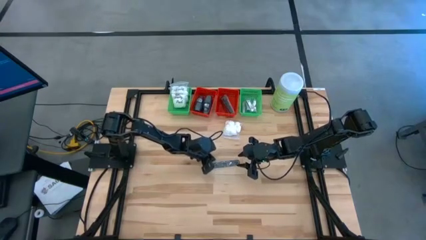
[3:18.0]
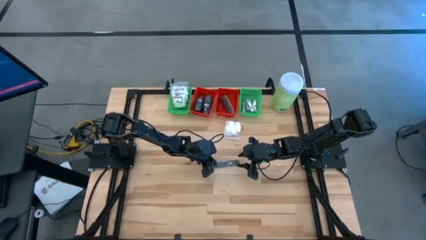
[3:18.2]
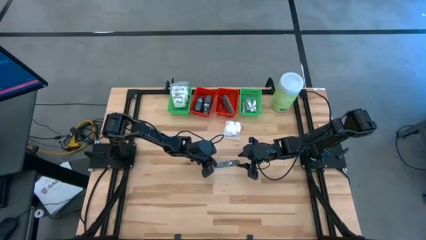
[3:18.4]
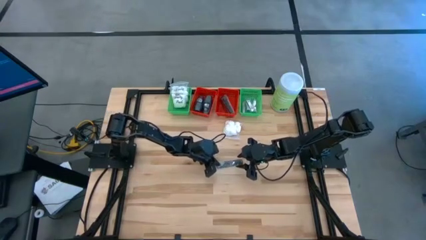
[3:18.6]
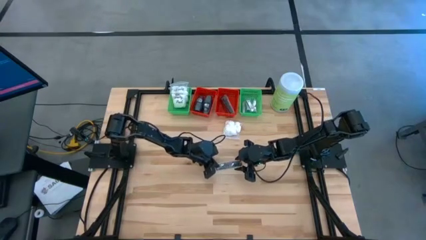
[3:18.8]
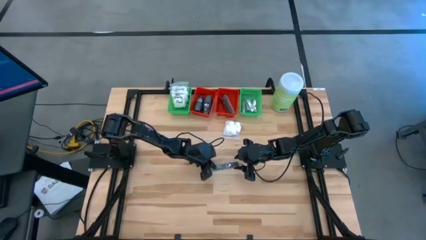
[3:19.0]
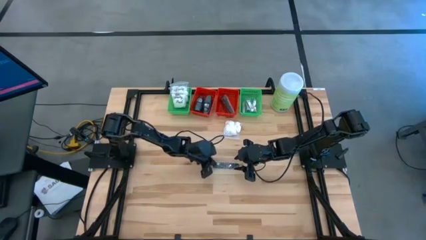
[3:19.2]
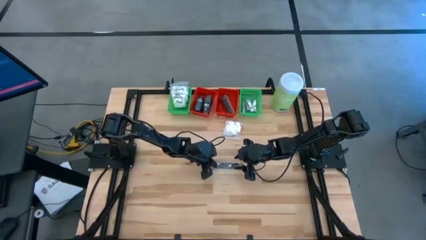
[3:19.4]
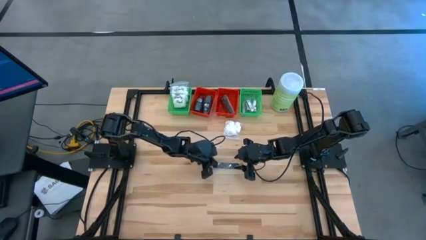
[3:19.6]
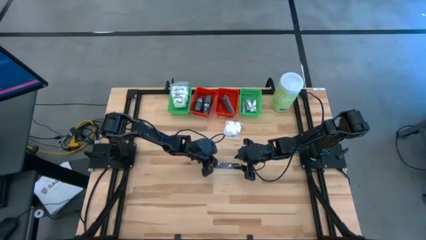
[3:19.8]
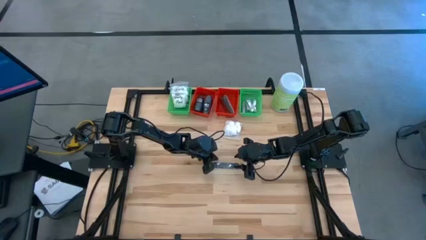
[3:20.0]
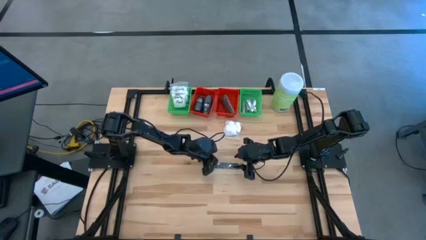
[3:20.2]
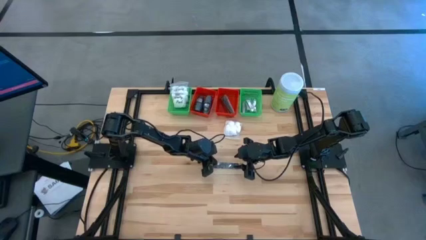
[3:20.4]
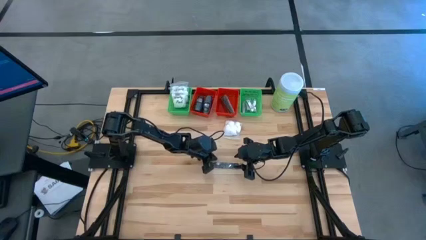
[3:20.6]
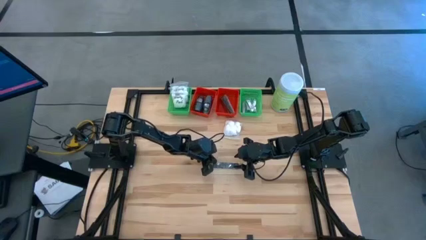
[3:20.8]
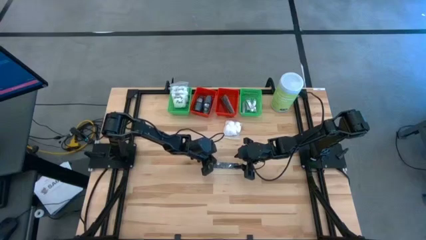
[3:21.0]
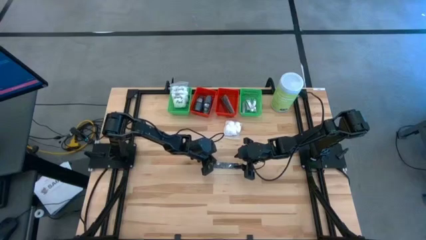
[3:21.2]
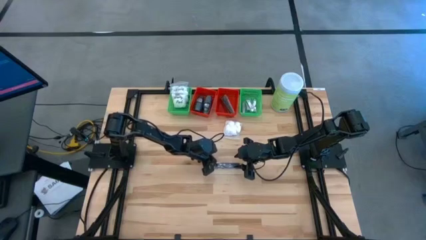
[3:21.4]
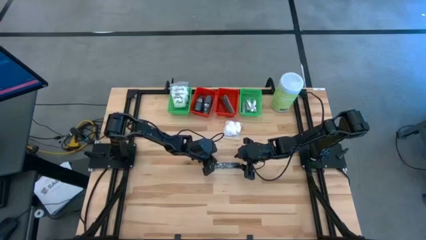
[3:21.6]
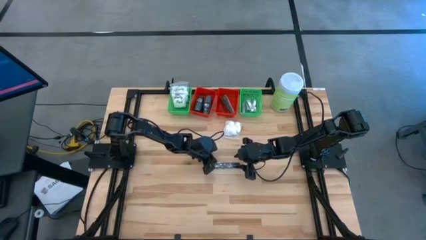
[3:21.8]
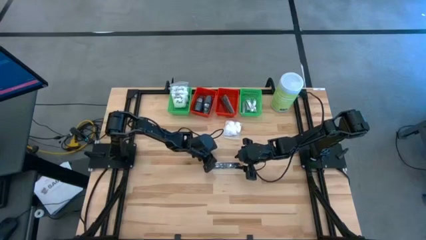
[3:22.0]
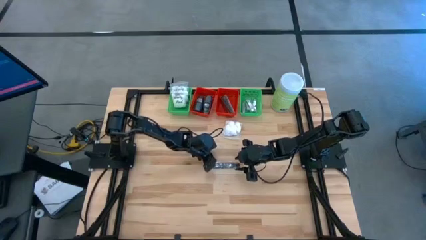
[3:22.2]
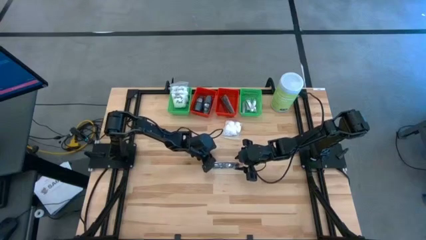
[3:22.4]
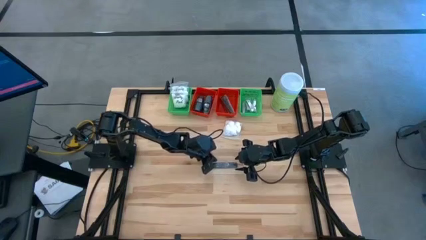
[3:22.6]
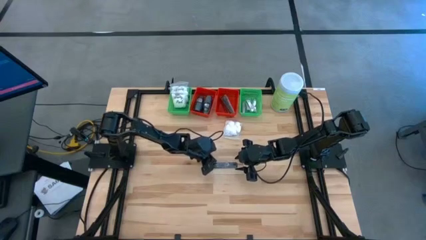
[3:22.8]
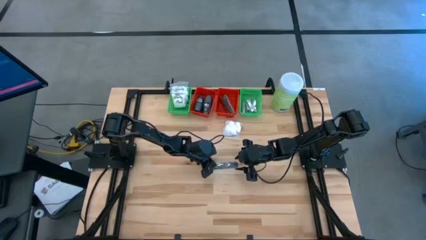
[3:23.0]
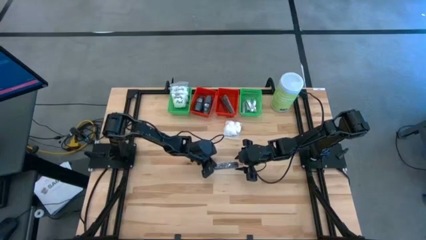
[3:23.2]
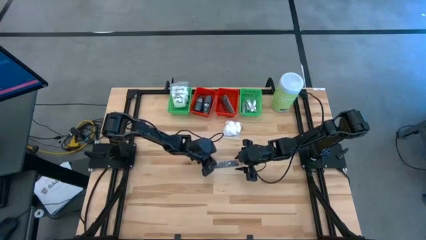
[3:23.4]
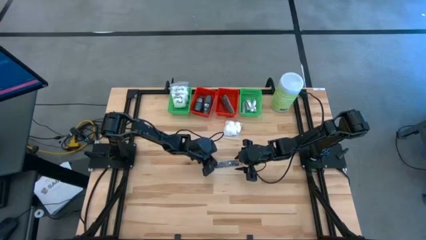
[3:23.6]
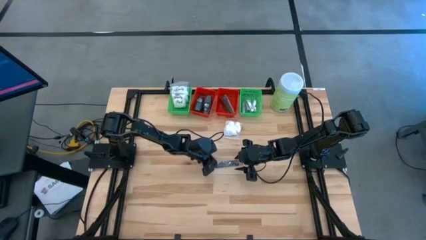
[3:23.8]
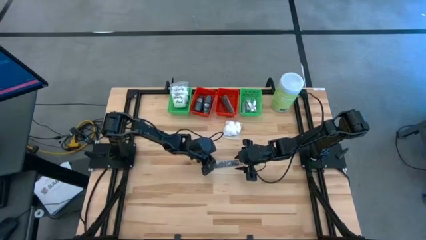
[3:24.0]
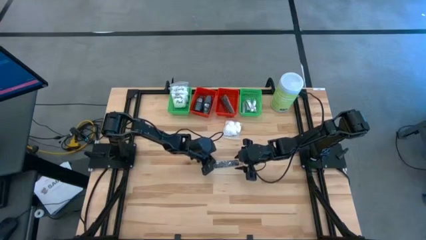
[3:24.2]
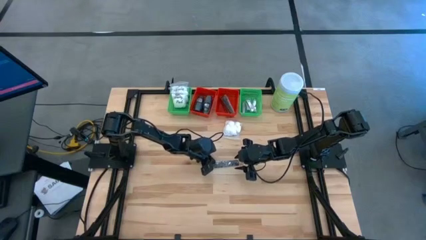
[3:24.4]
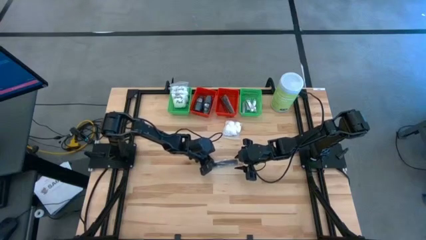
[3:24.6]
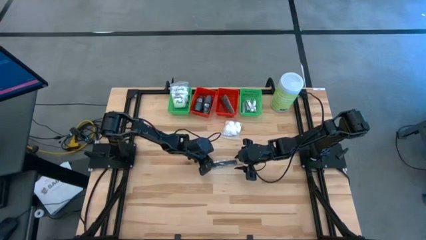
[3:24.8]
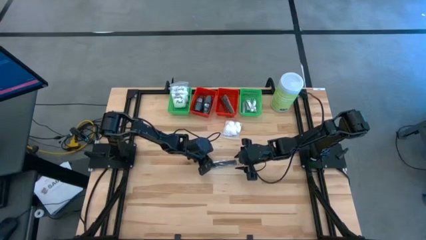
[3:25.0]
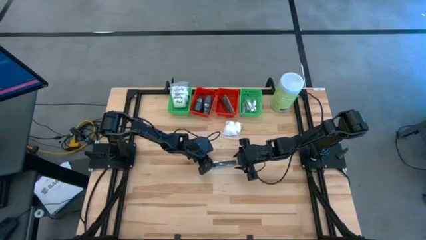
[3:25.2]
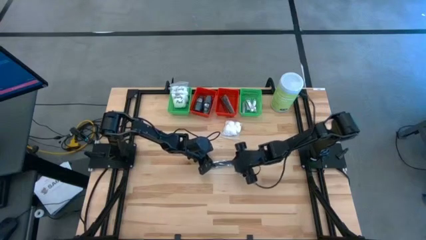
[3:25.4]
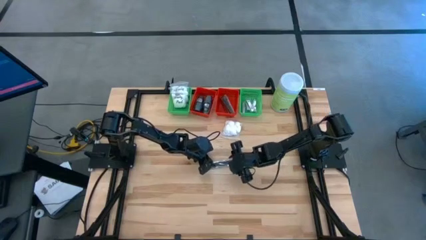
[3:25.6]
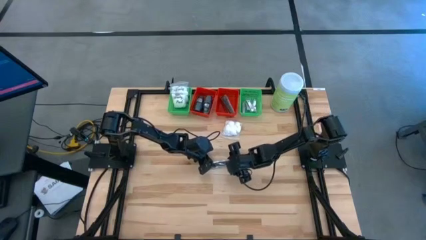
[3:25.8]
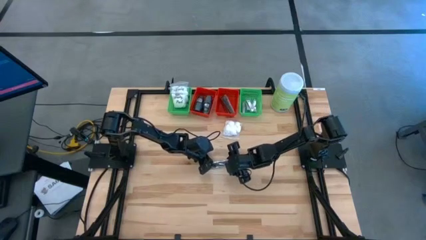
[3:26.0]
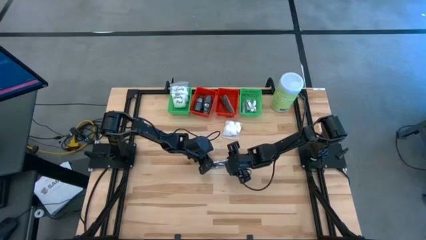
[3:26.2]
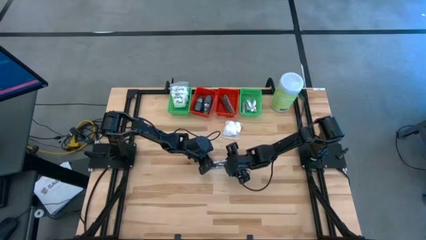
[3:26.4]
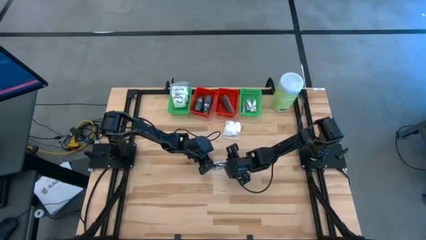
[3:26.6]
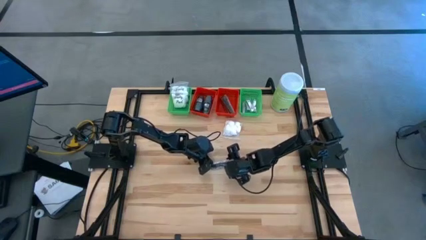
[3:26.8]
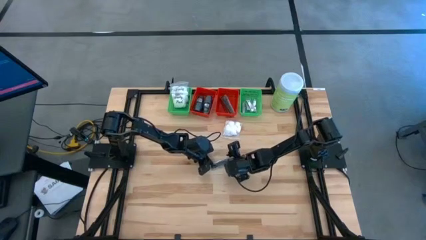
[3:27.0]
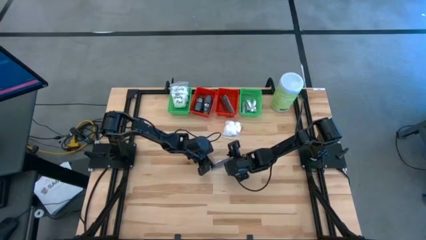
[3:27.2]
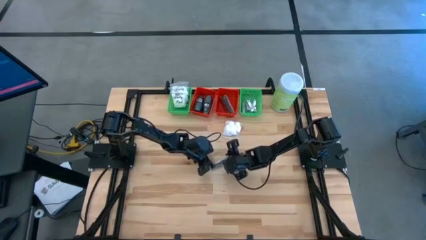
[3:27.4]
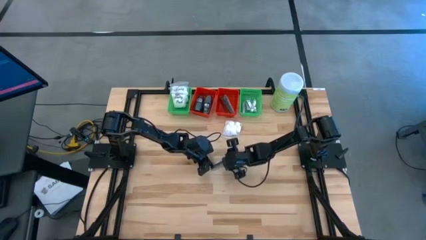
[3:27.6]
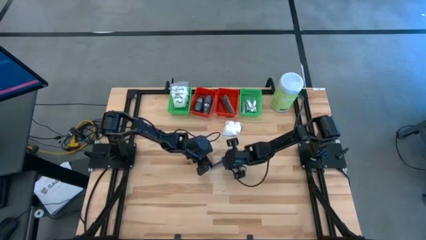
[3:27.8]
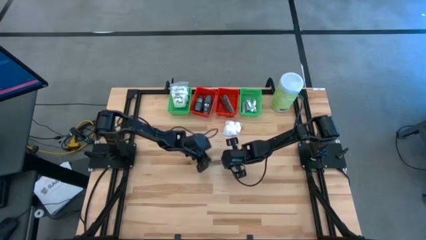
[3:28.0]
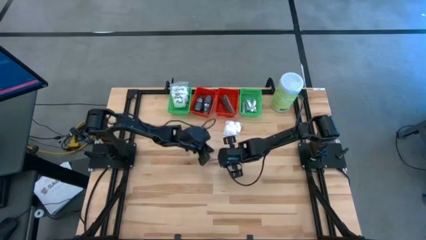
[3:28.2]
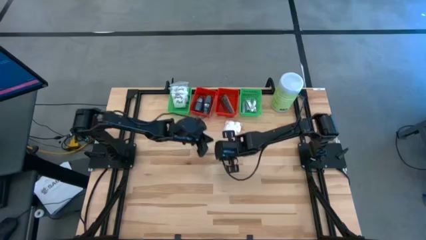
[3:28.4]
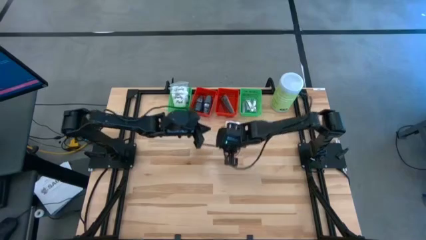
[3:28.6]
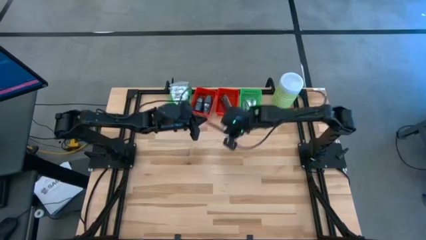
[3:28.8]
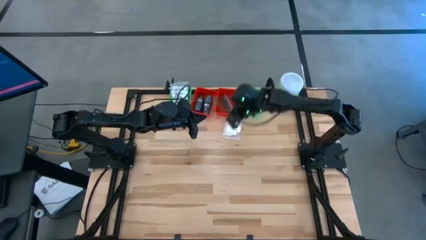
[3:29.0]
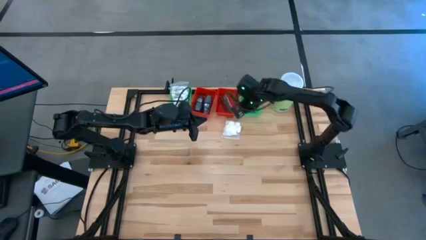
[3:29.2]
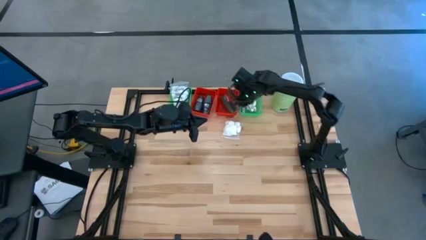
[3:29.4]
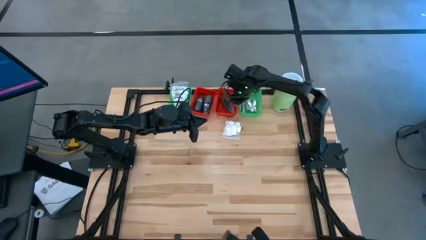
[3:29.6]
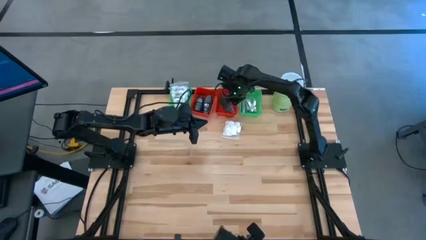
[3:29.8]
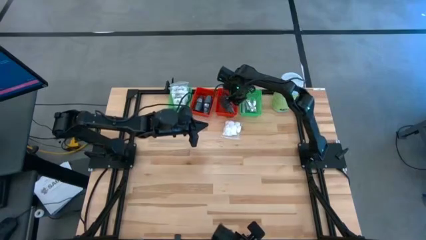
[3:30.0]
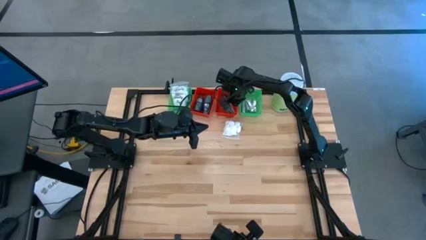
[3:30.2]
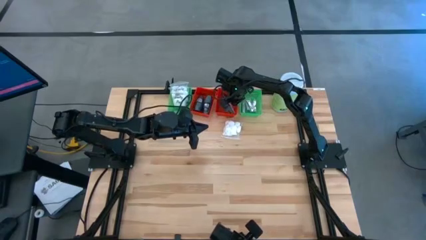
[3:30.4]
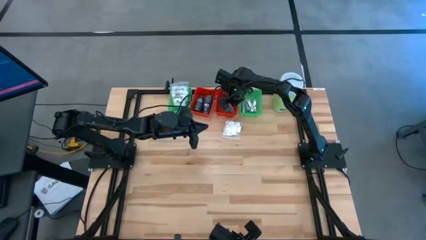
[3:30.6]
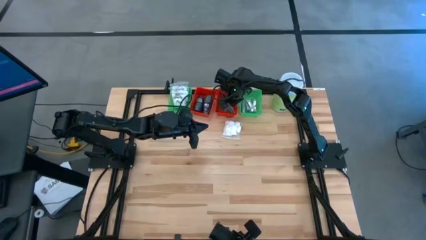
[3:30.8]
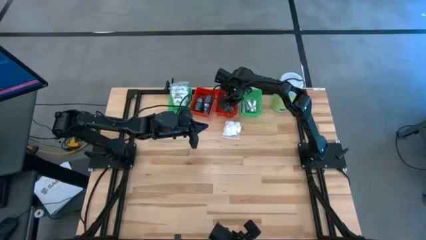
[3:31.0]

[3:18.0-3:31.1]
Task: Pick & Place Travel size toiletries
Put the comb into the right red basket

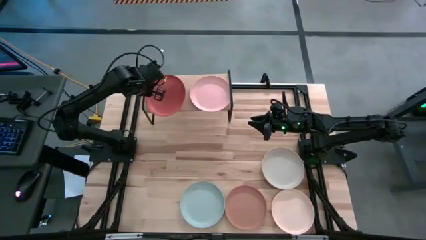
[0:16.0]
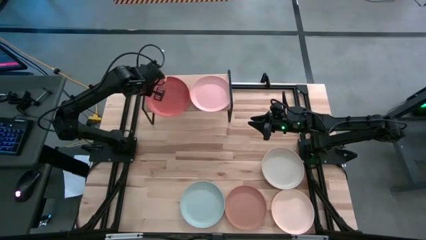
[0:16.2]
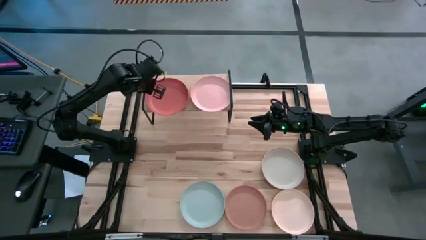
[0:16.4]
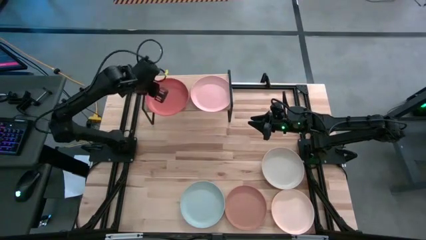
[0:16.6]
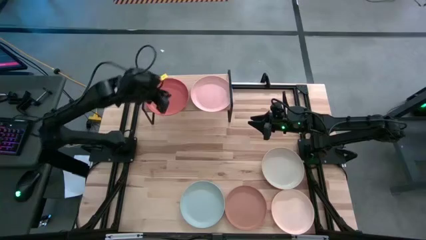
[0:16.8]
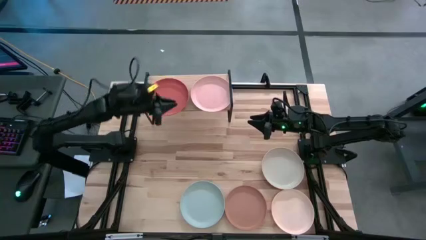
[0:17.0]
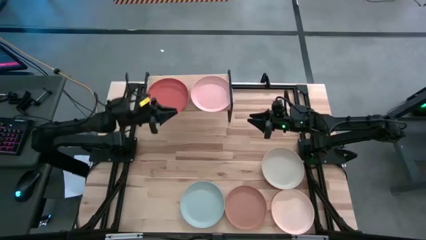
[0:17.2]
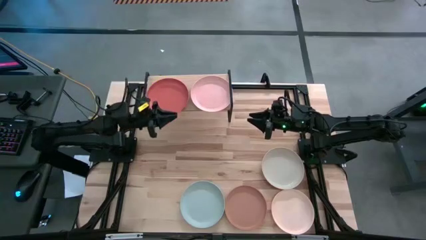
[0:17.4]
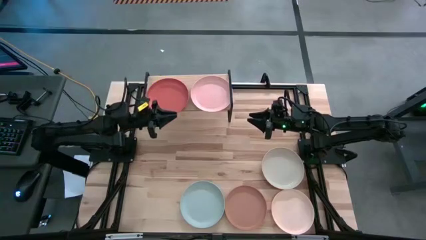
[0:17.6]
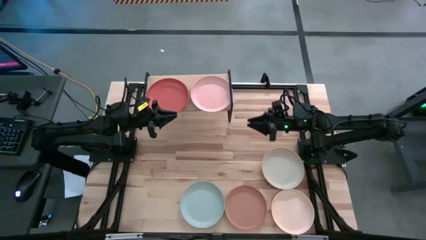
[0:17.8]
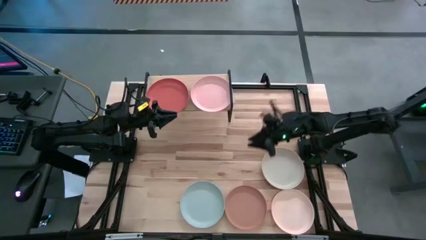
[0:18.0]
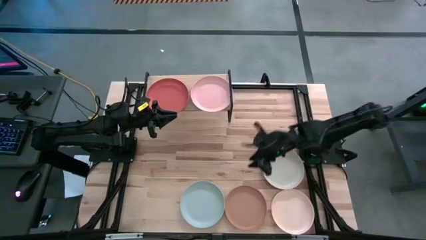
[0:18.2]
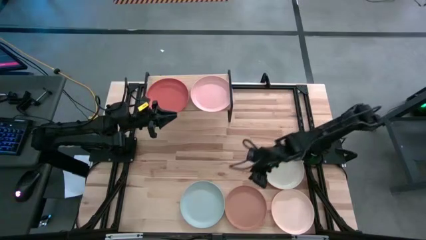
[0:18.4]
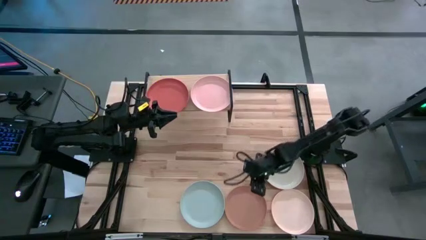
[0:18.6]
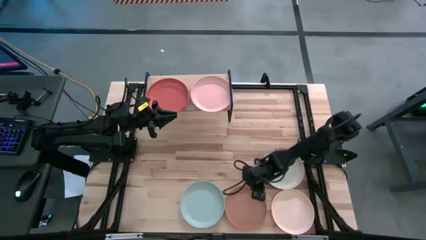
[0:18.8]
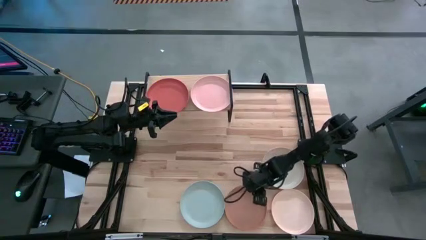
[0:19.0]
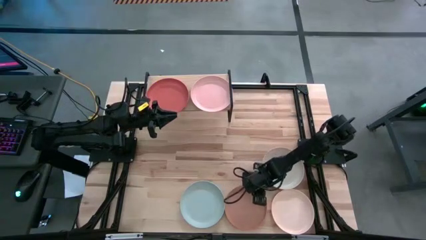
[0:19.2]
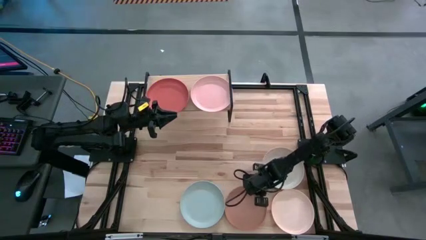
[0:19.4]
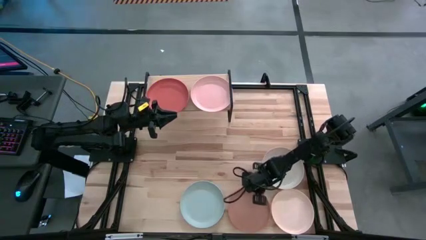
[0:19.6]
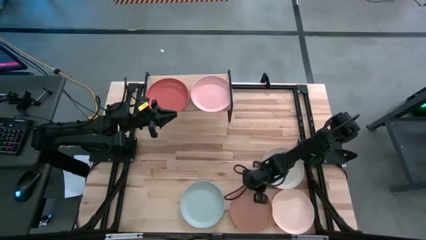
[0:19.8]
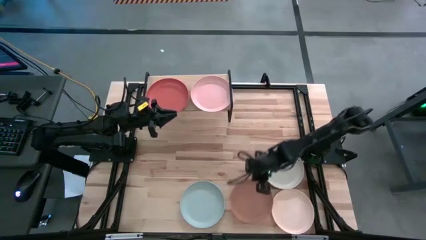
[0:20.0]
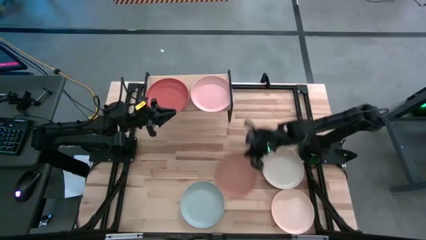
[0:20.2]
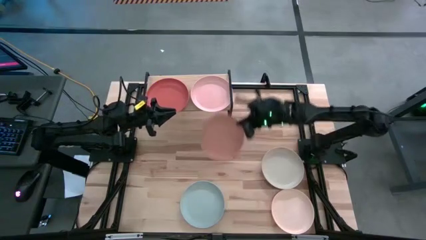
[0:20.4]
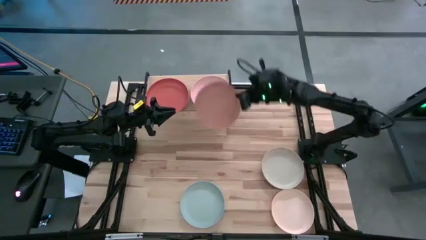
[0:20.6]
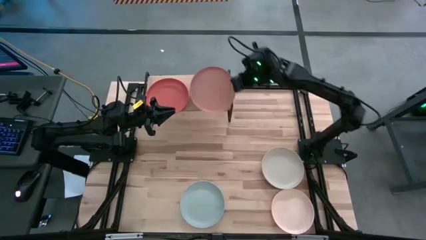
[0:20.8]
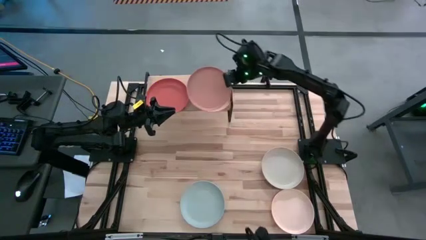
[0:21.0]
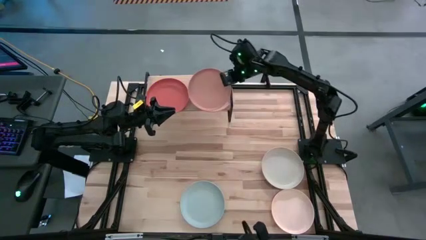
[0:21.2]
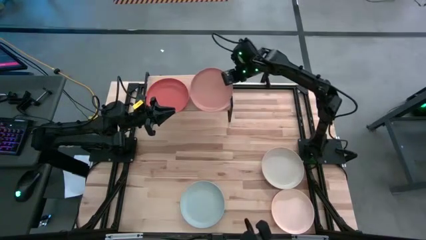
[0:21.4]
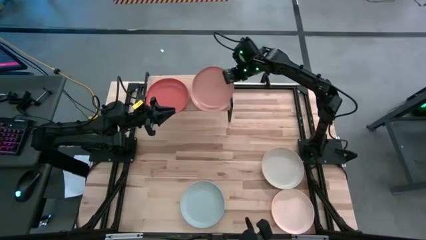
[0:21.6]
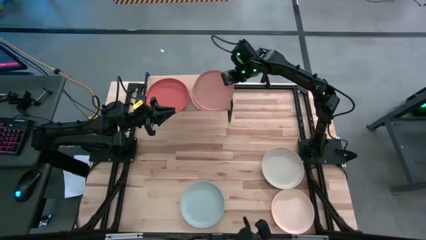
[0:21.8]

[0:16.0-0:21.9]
Task: Place and stack plates onto a shelf
Stack the brown plate on top of the pink plate
